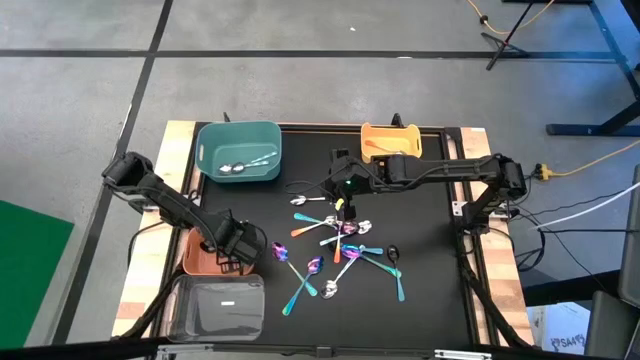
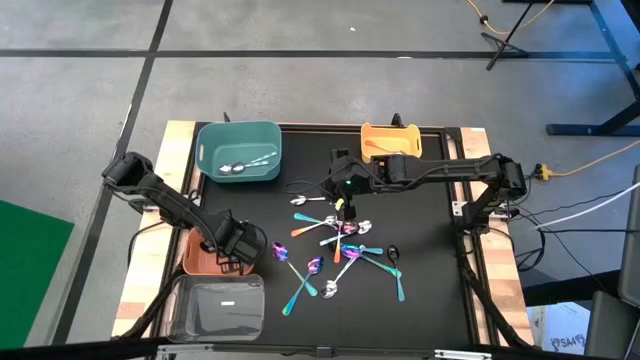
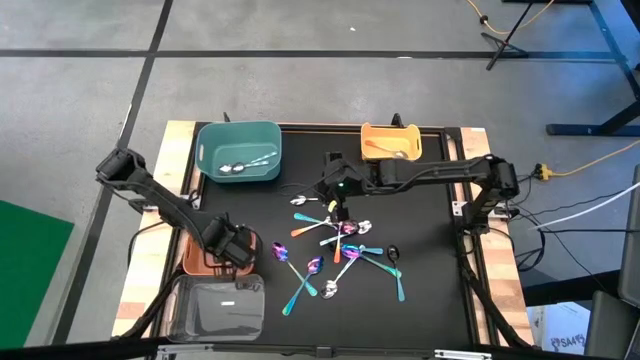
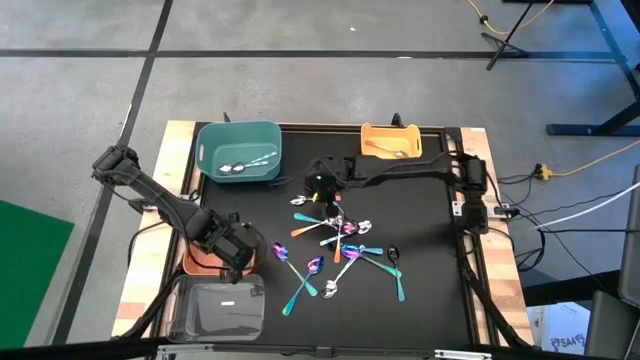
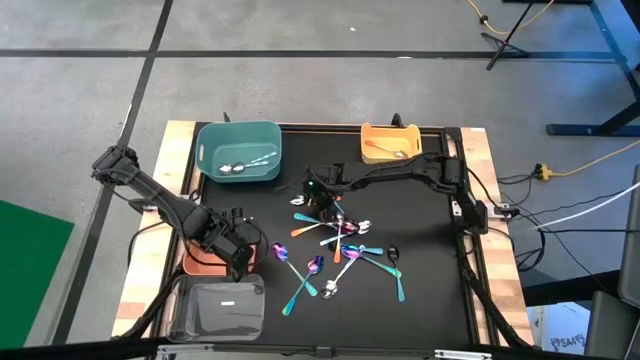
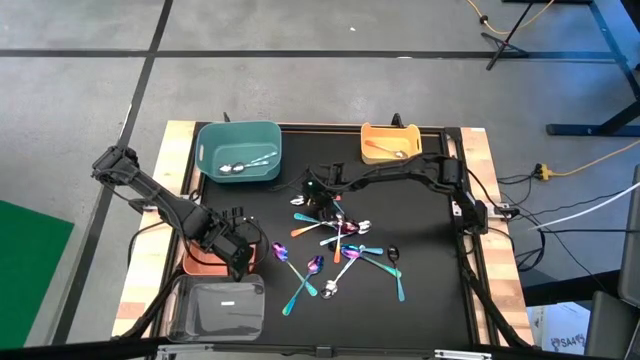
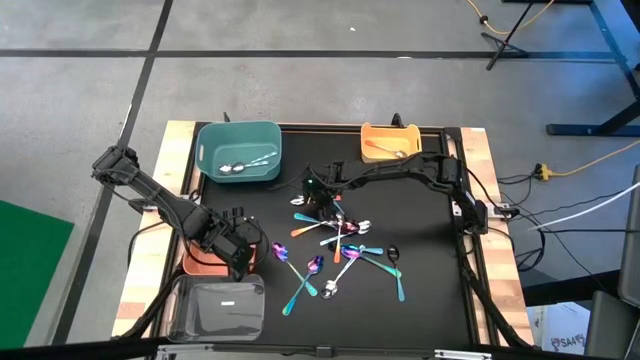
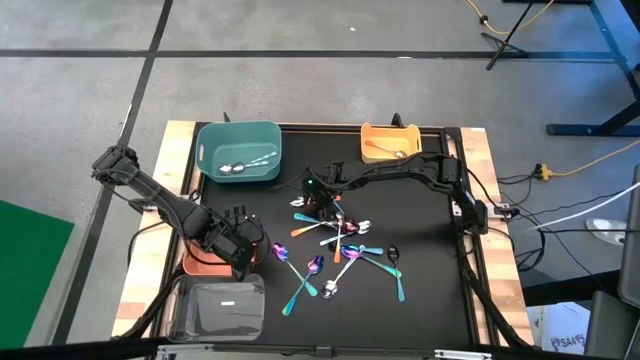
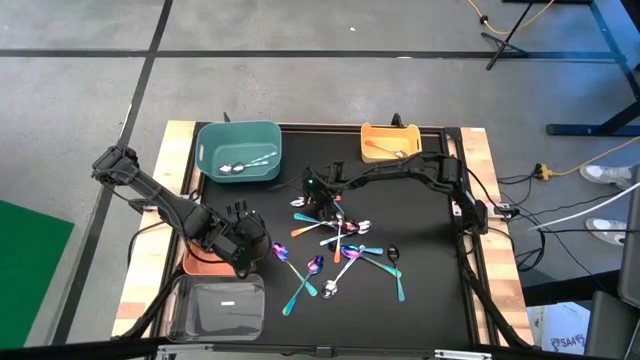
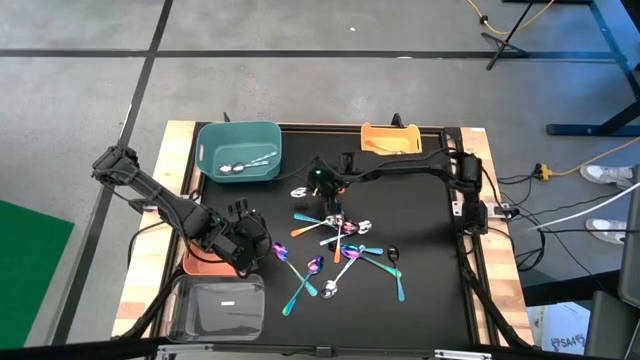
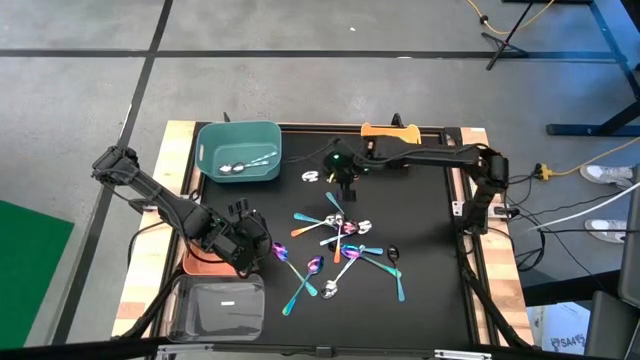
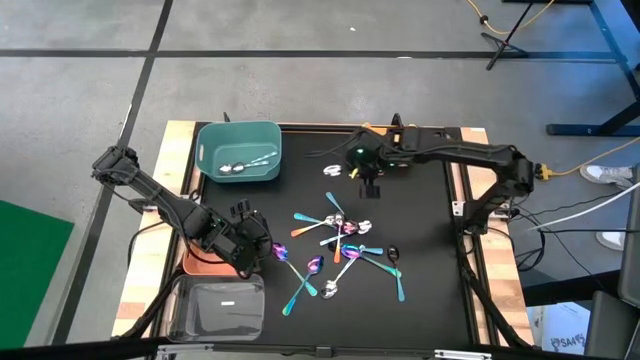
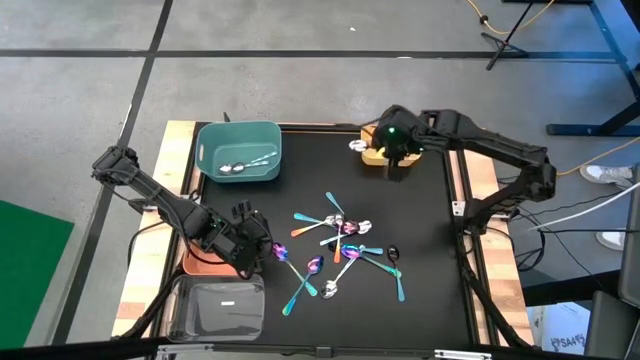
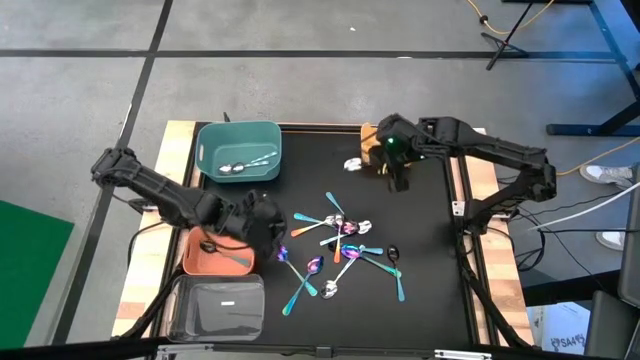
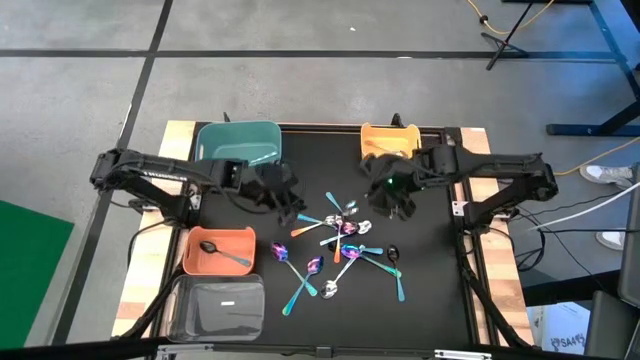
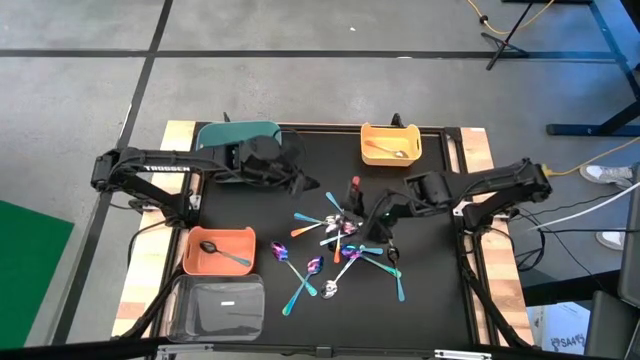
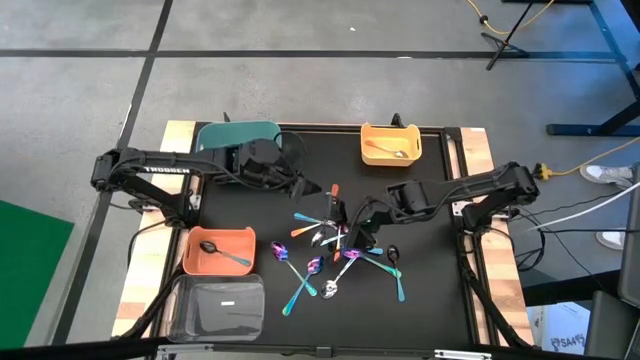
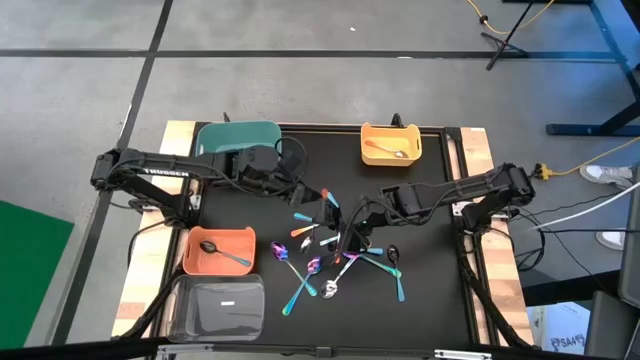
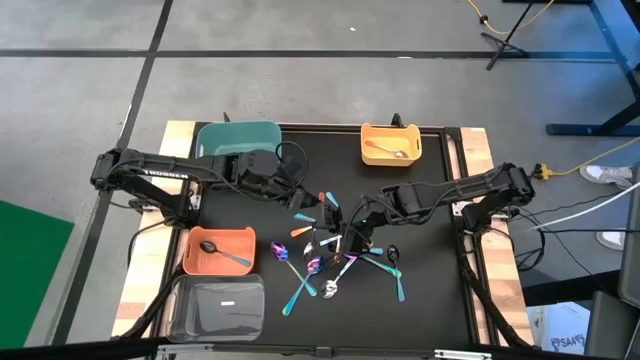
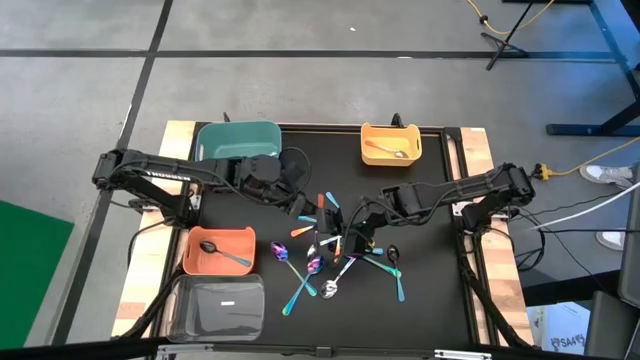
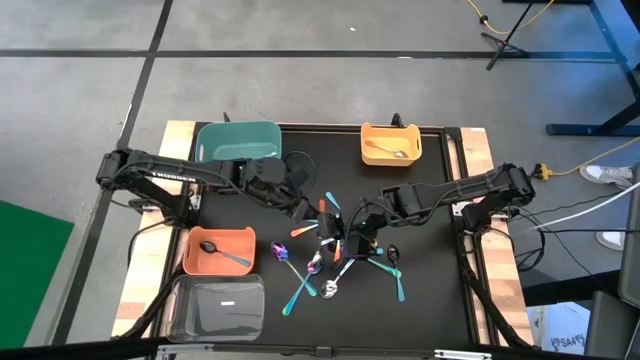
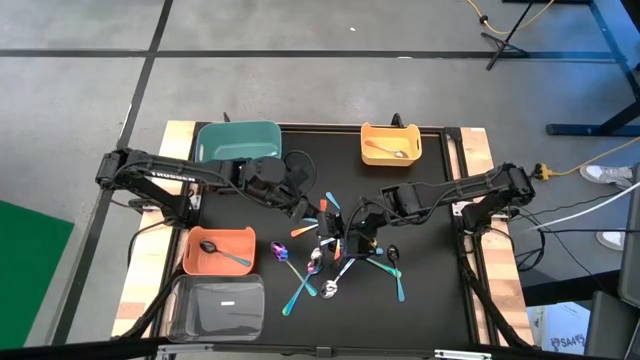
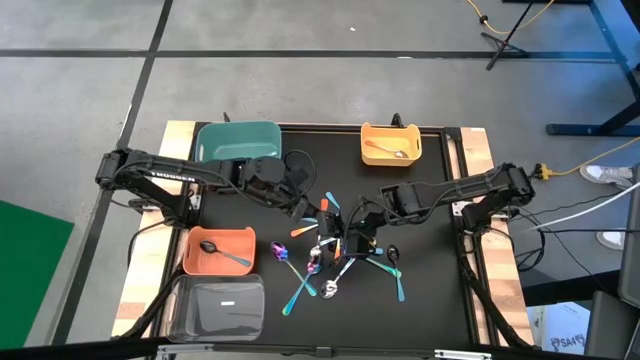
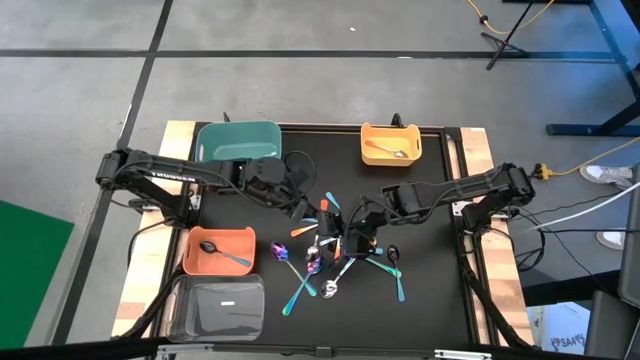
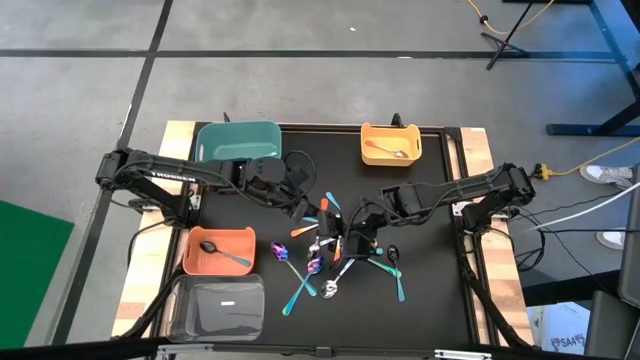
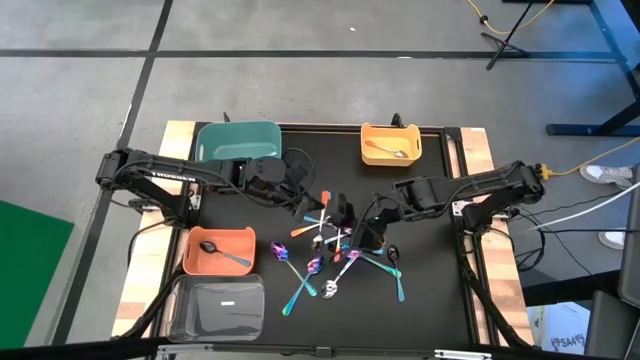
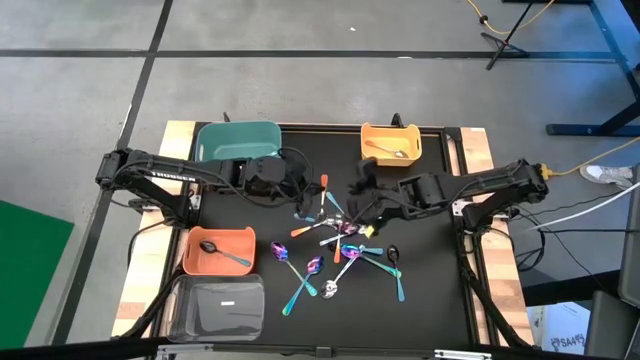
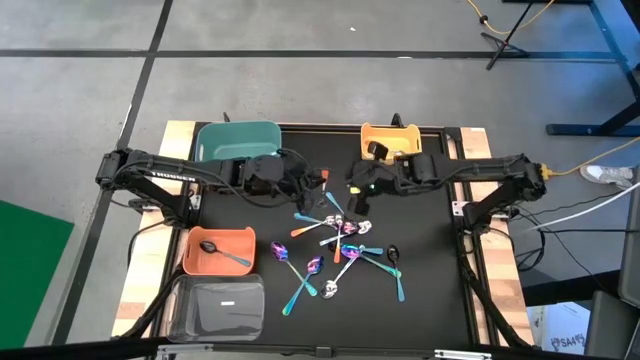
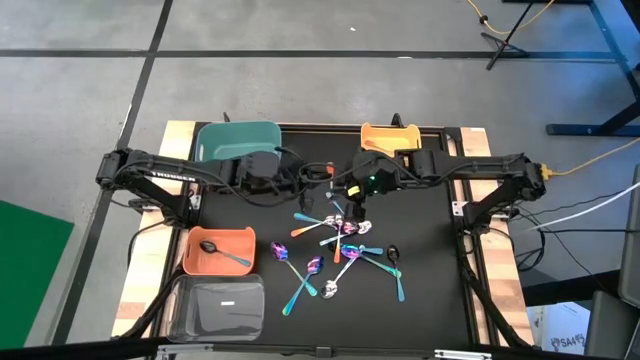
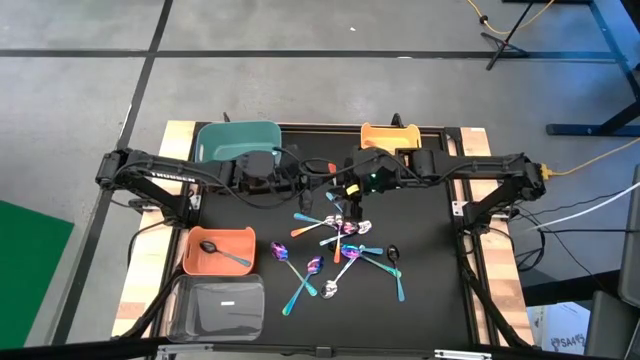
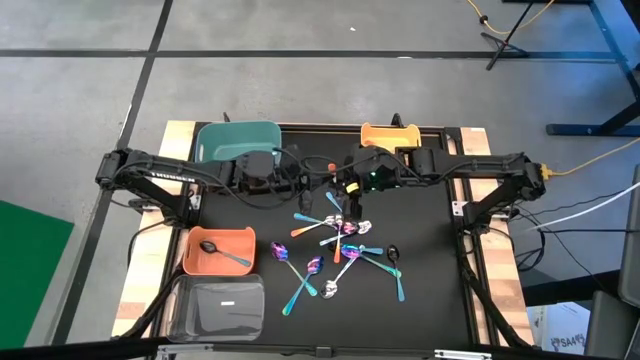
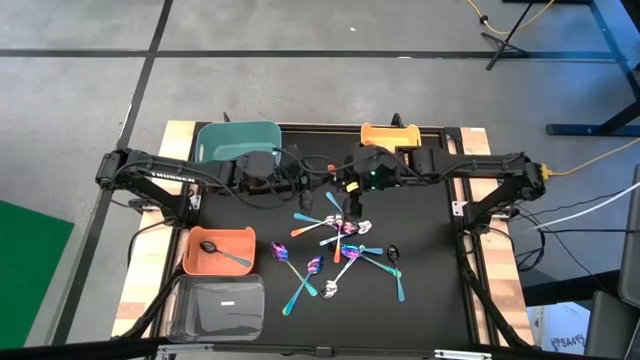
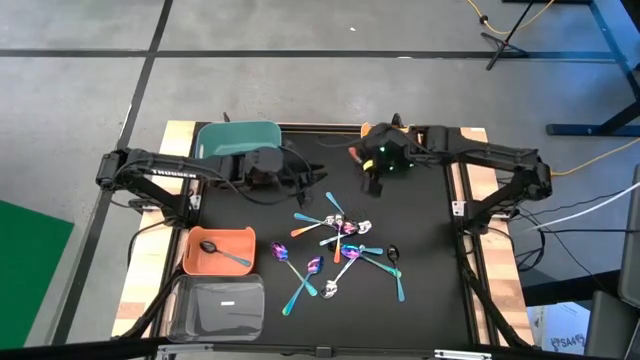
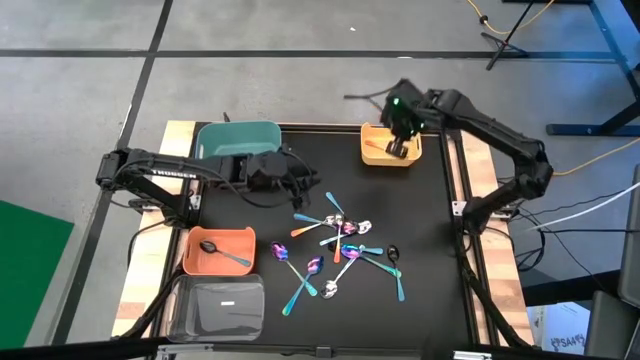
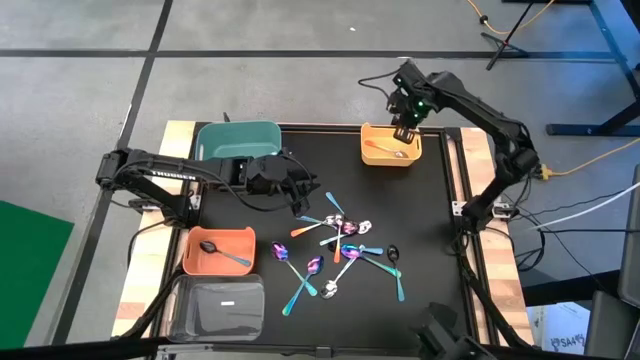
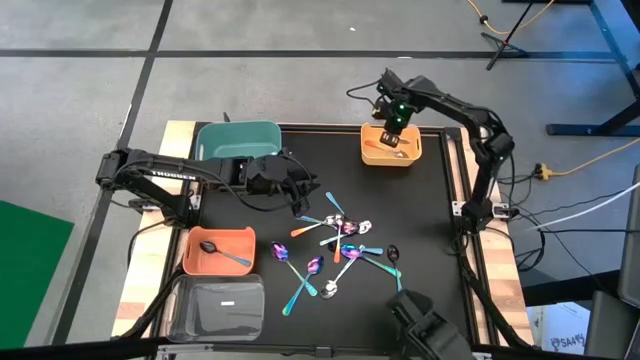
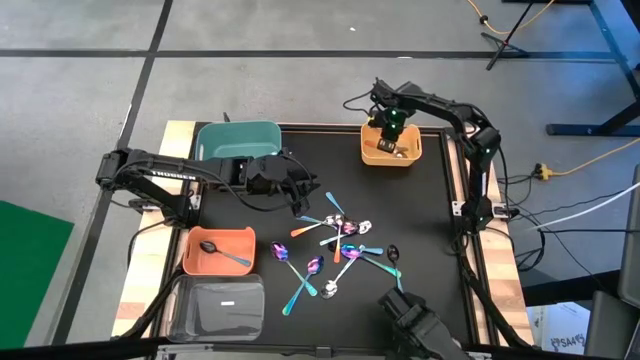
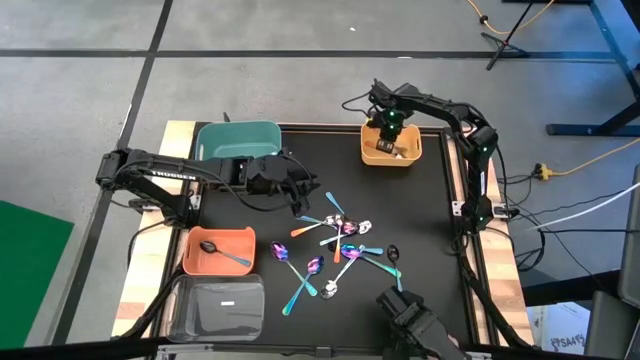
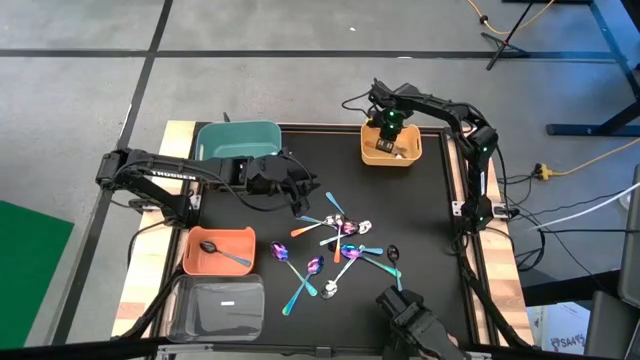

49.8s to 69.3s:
Task: Sort silverware by color (type)
Put the orange spoon into the yellow bin

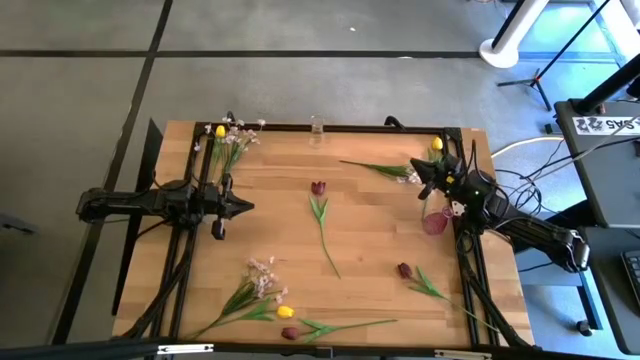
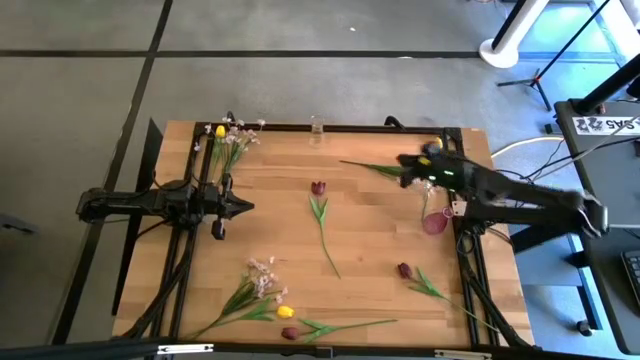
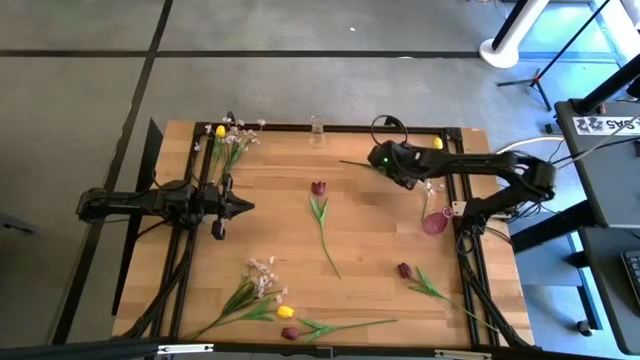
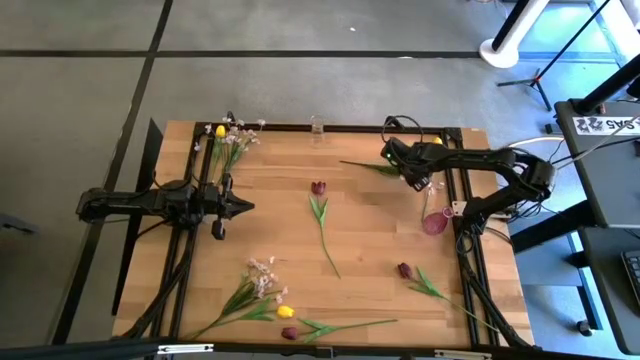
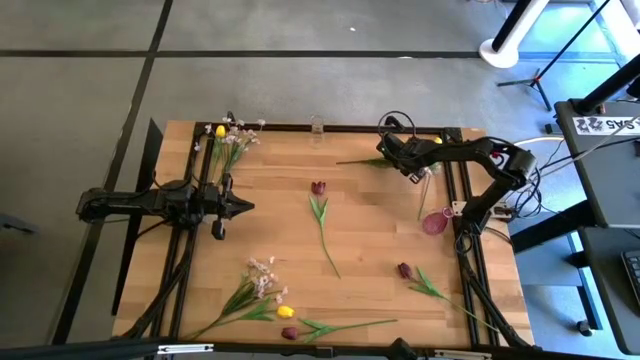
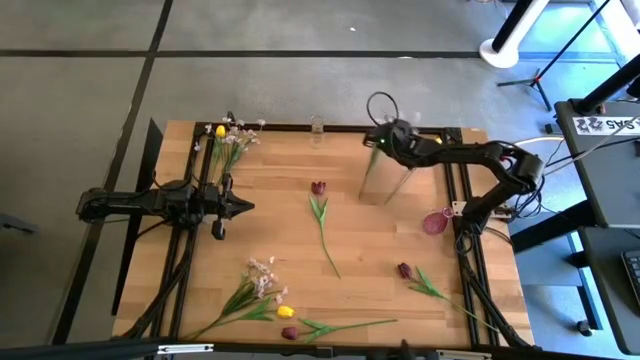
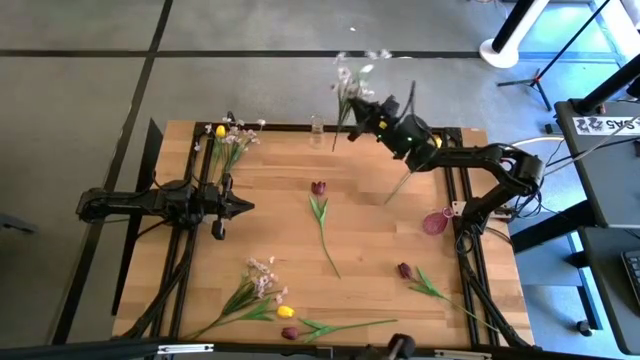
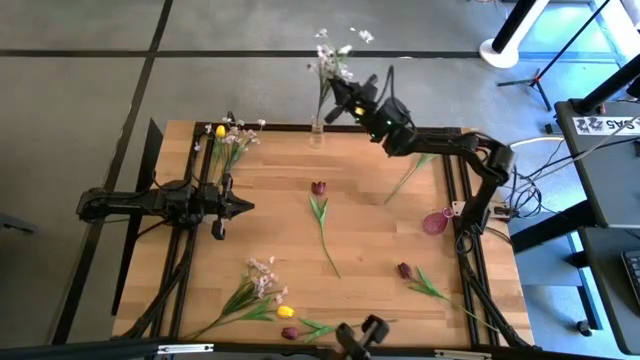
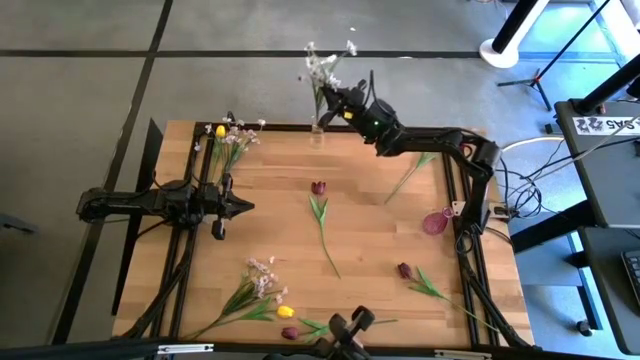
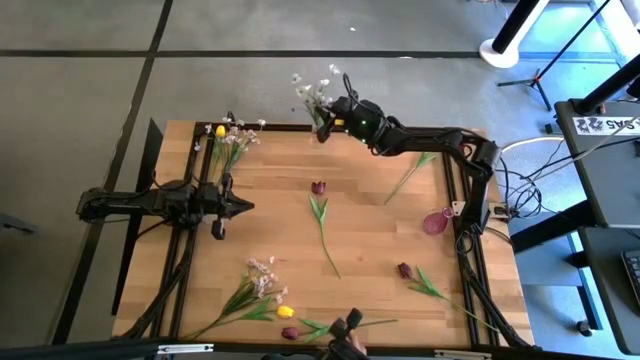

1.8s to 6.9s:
Task: Sort flowers into vase by color
Put the top right white flower into the top transparent vase
